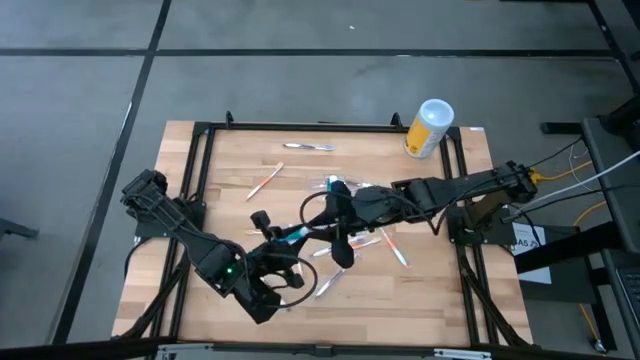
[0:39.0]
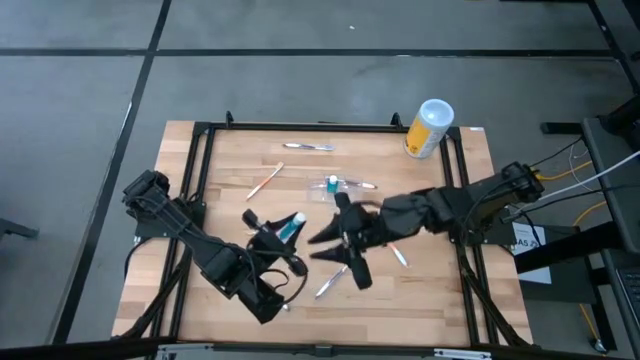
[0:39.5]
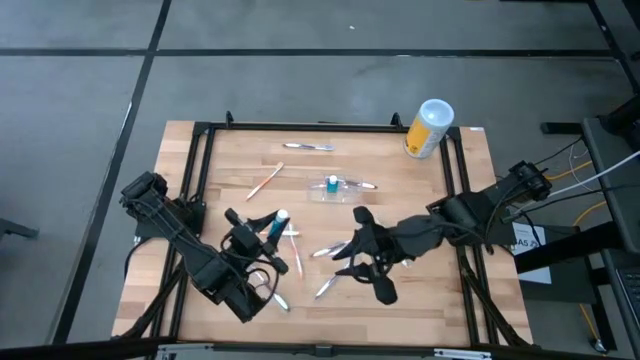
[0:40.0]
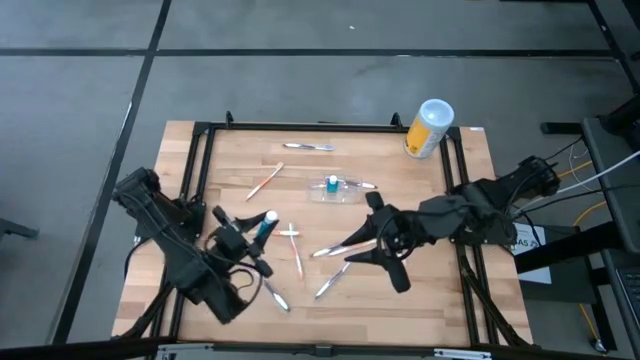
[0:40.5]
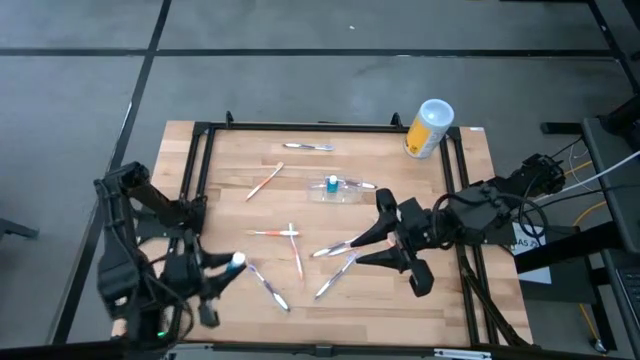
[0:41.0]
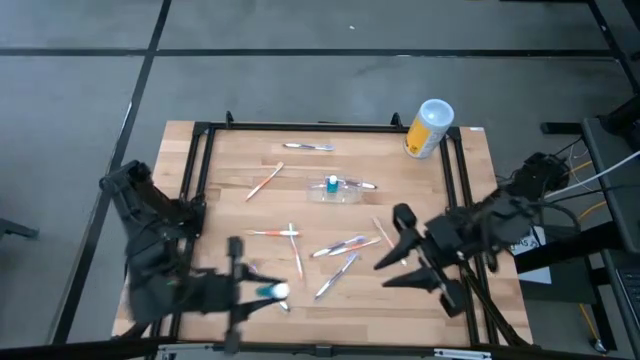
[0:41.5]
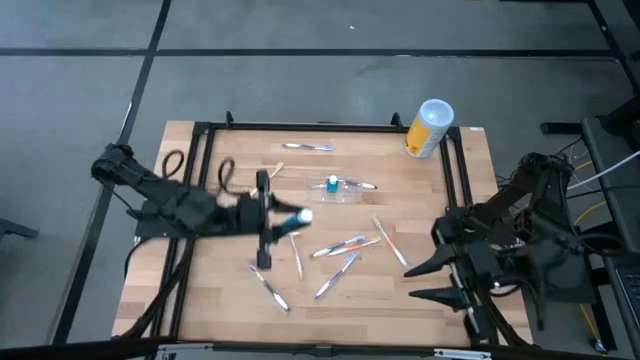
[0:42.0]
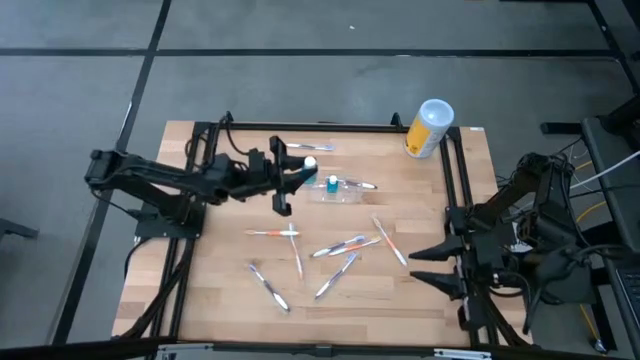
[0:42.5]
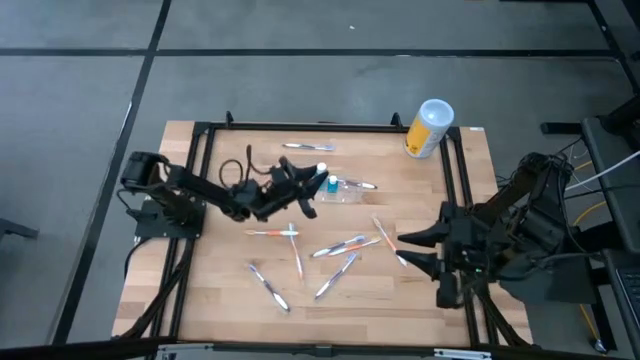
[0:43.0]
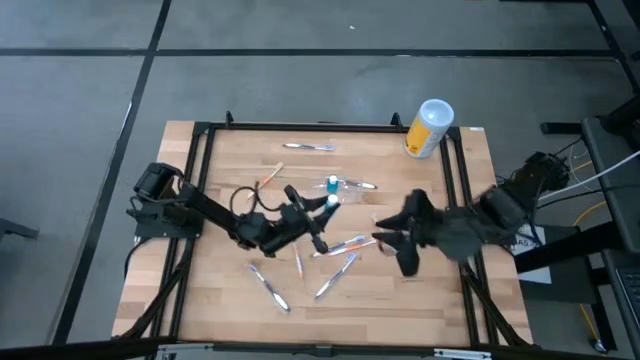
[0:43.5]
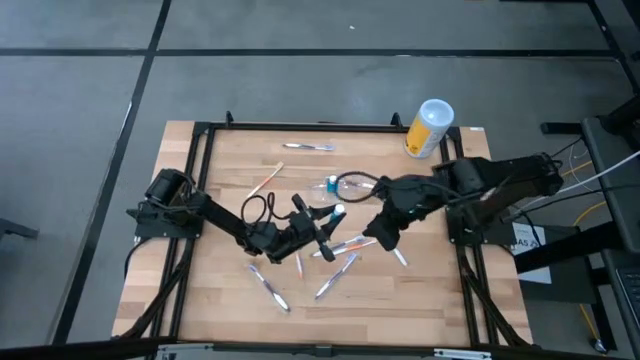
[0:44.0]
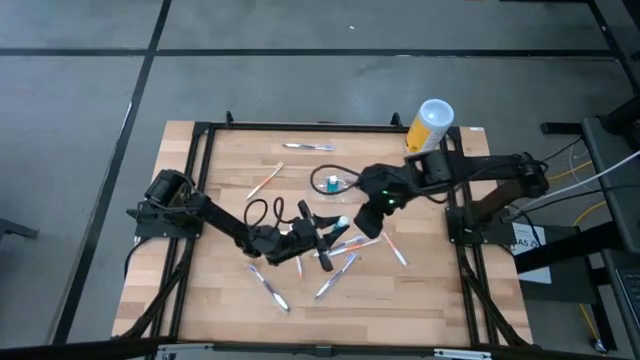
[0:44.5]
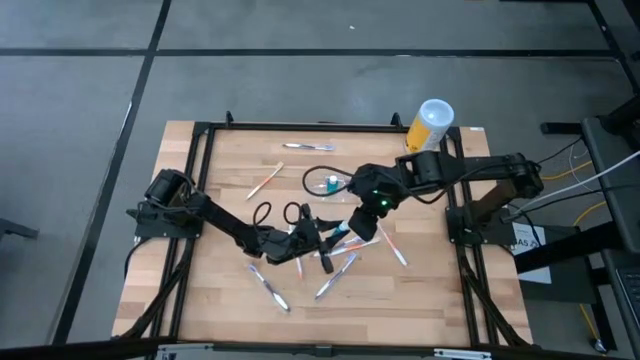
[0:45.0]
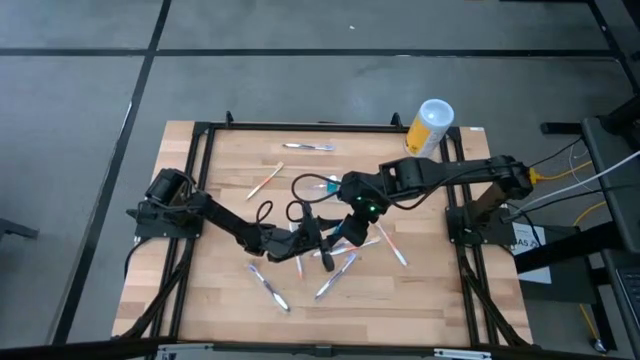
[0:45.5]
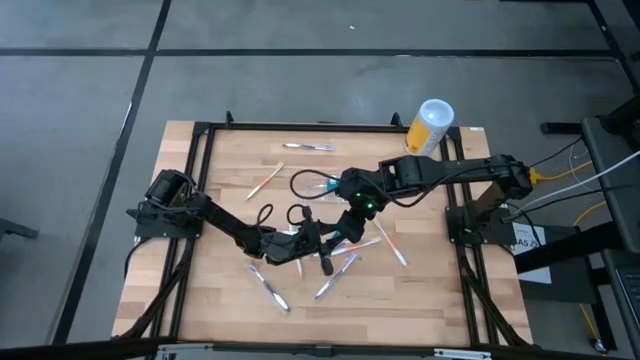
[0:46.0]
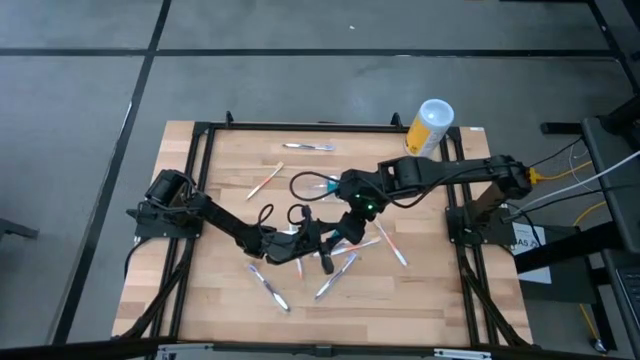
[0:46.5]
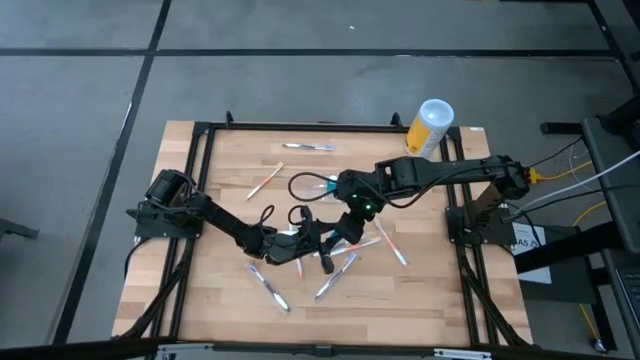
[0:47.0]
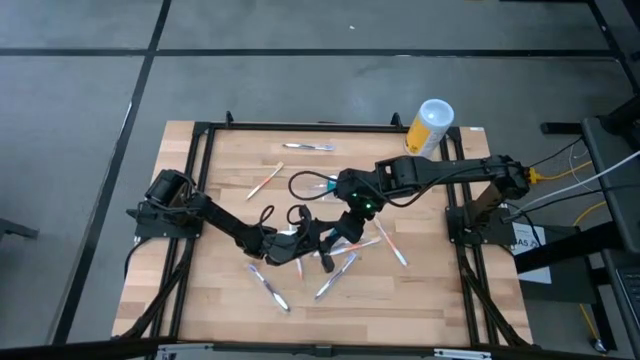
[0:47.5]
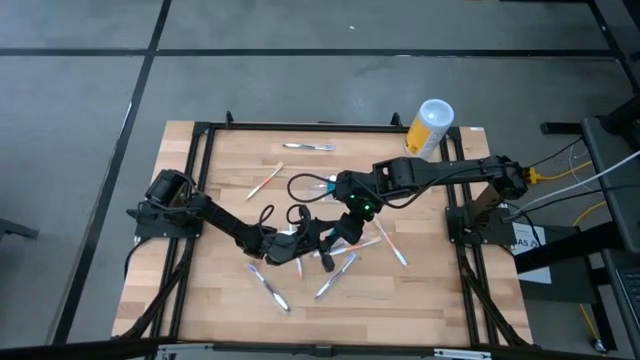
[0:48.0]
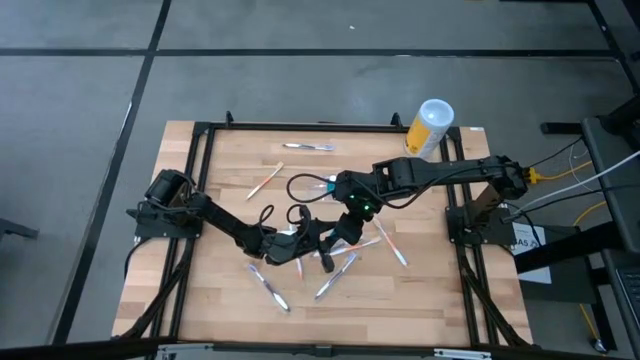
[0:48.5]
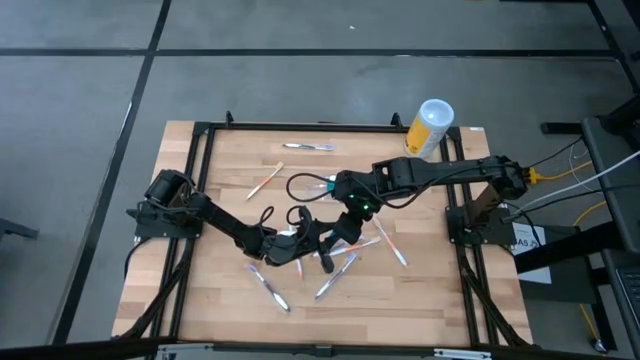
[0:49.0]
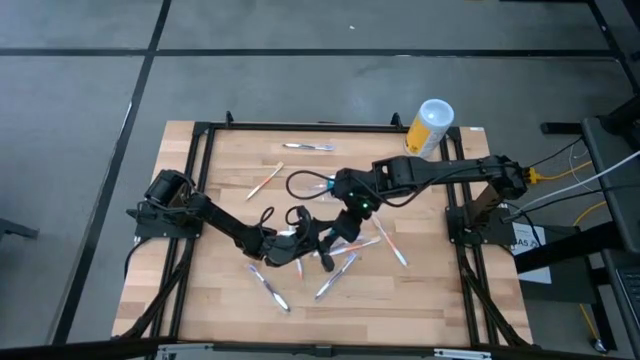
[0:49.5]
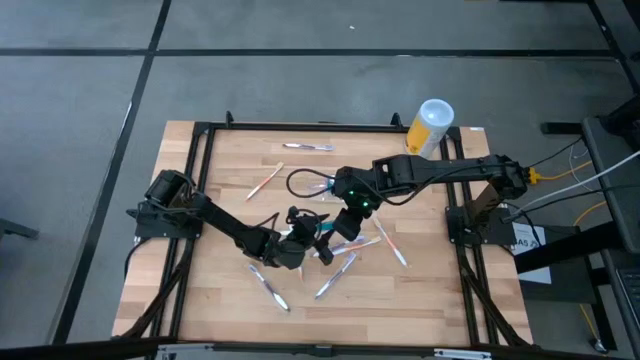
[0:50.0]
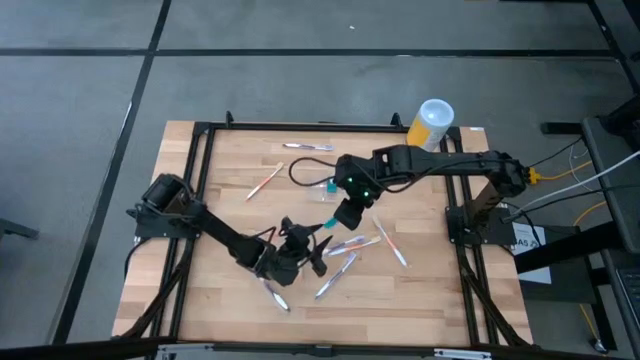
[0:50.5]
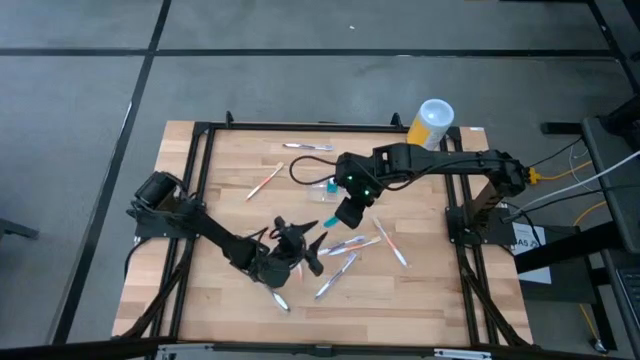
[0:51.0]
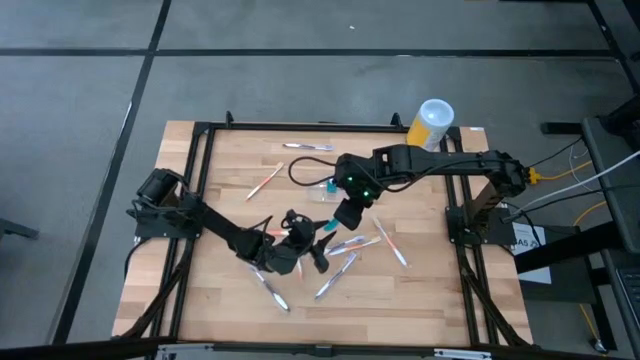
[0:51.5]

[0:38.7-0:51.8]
Task: Pick & Place toothbrushing station
Put the blue mouthwash into the middle section of the transparent organizer

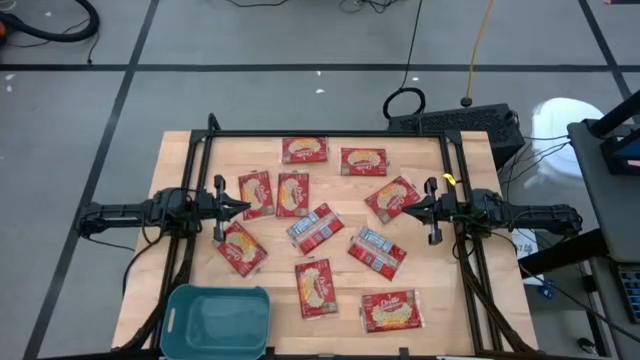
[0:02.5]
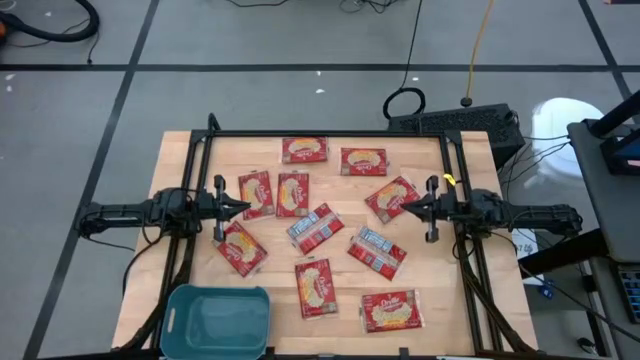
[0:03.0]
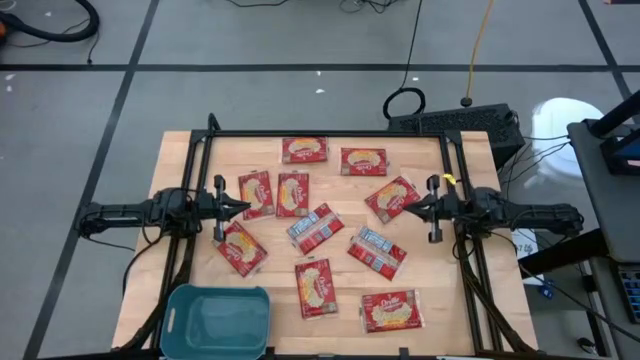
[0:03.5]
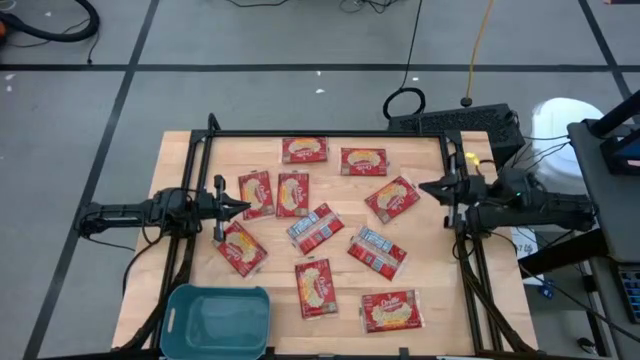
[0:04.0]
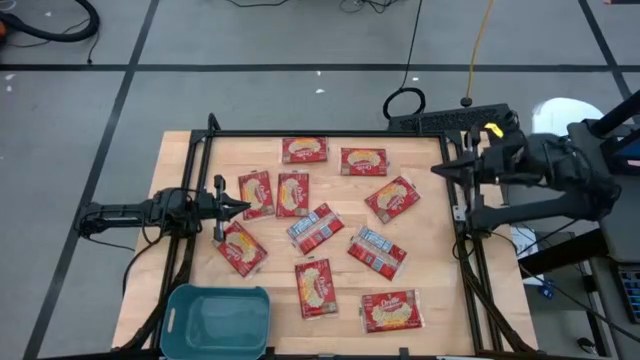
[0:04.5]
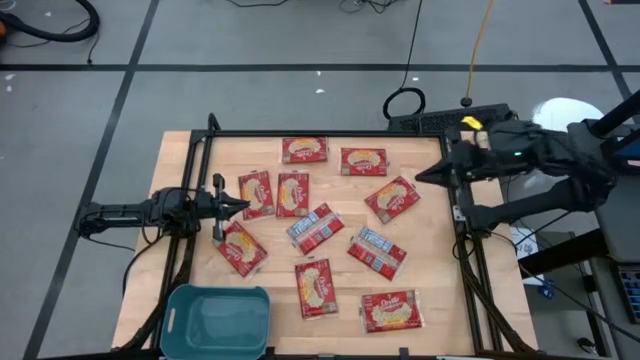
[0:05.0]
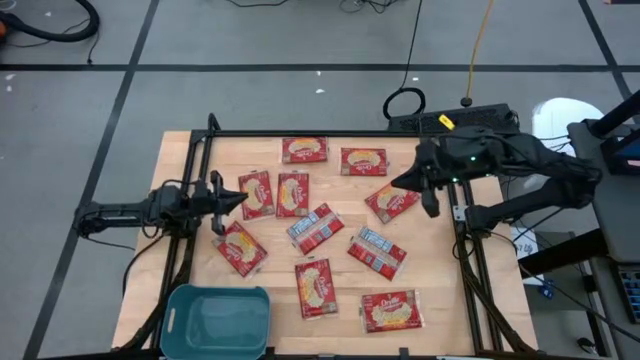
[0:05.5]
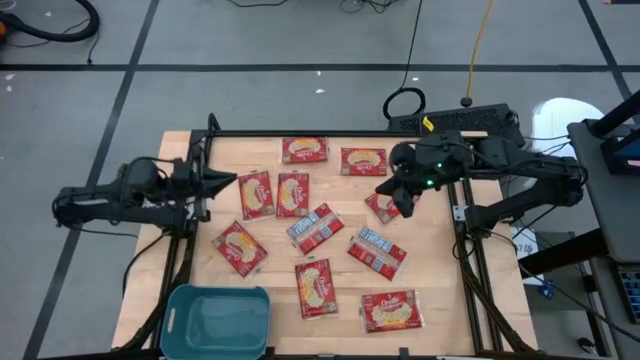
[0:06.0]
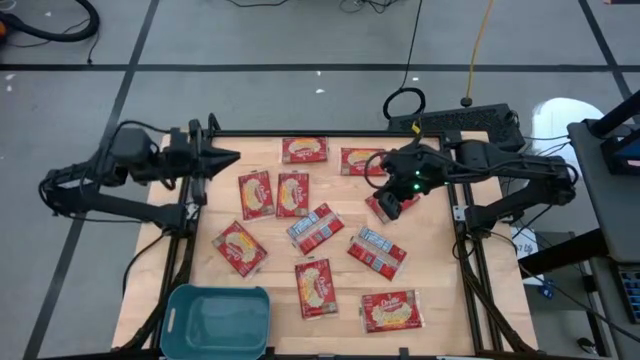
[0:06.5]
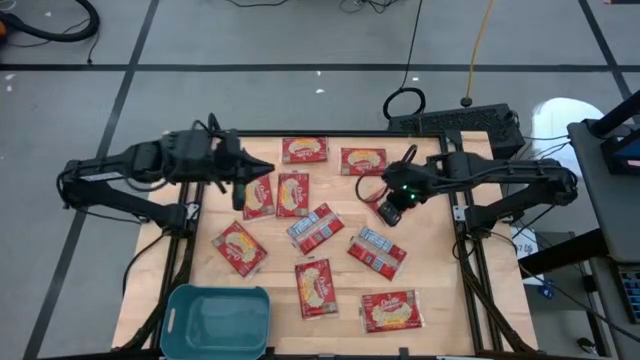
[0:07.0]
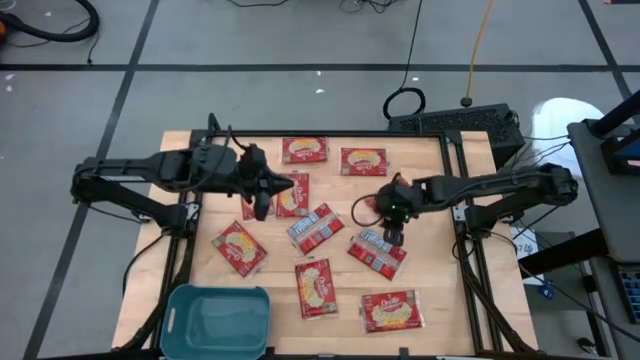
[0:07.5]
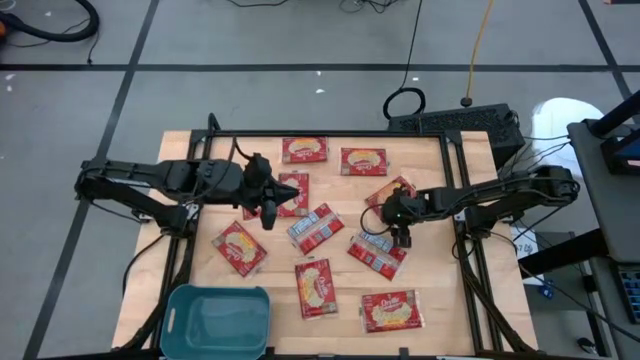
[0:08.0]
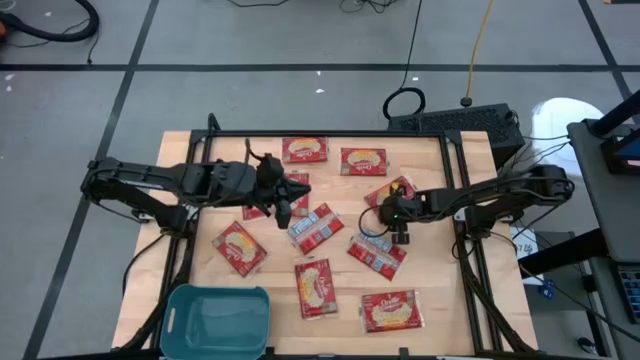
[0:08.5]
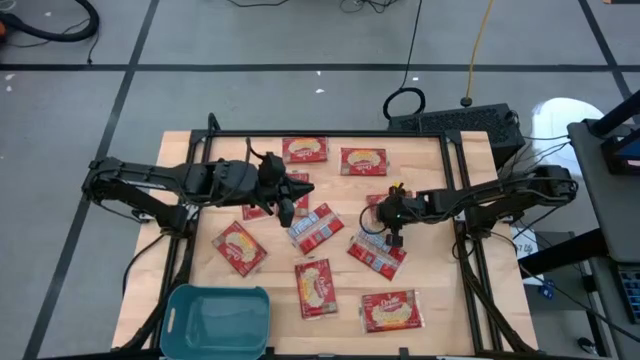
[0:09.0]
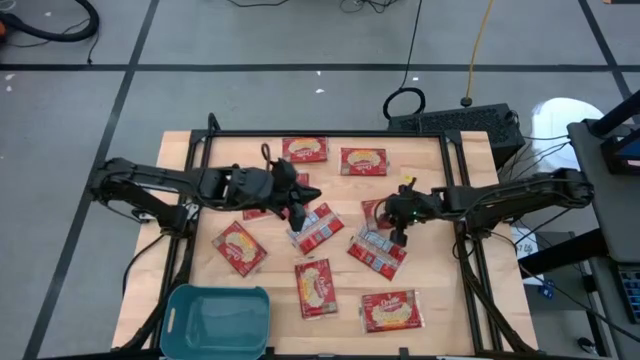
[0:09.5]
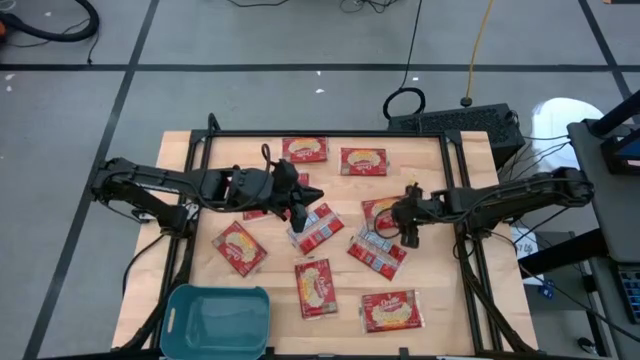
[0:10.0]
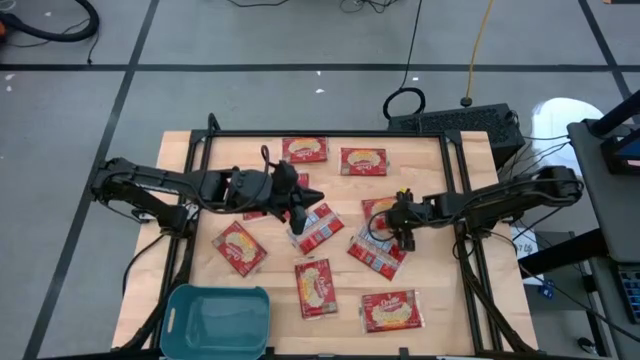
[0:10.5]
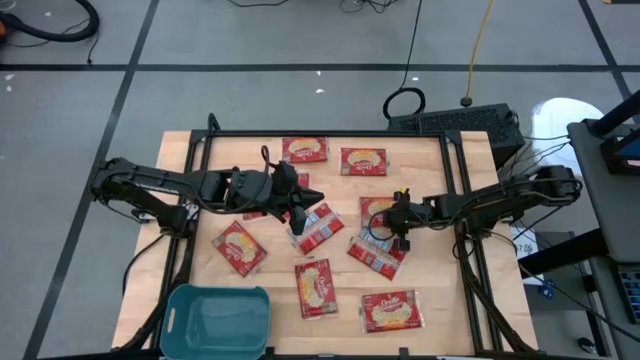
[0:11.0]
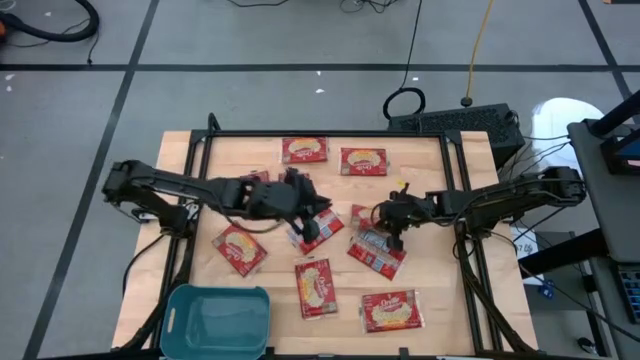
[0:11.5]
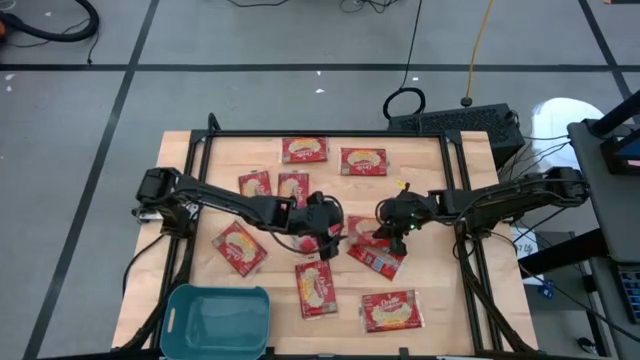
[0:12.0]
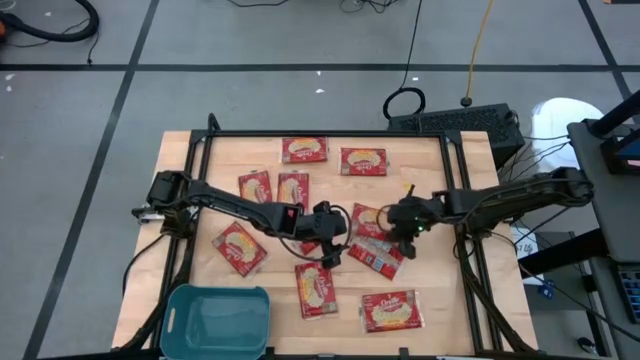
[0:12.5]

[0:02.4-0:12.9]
Task: Sort popcorn bags into baskets
Put the popcorn sachet into the bin
